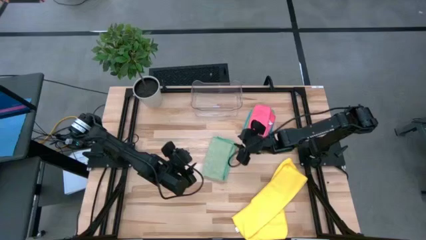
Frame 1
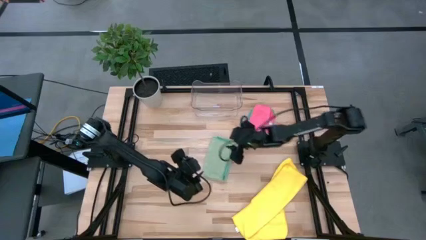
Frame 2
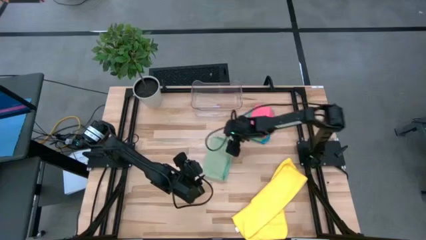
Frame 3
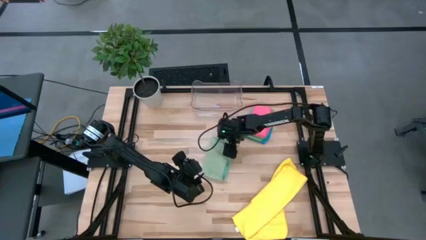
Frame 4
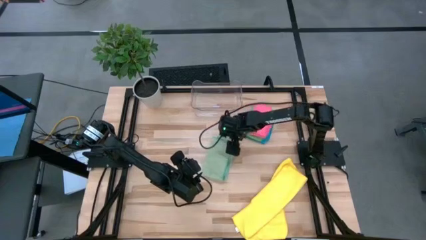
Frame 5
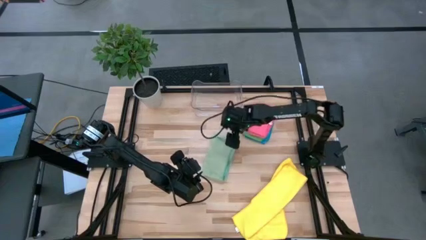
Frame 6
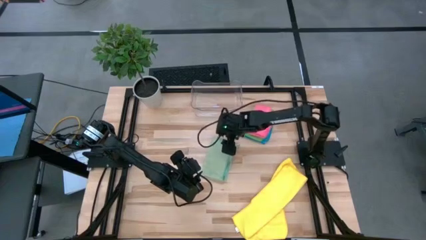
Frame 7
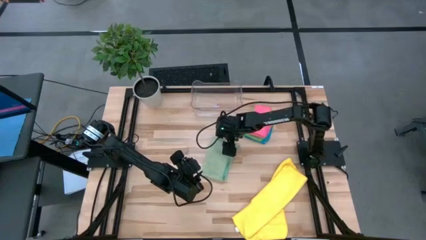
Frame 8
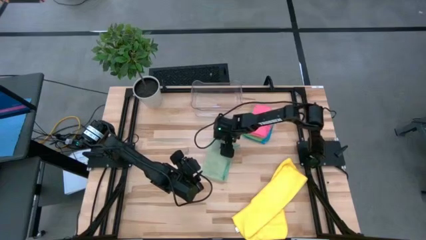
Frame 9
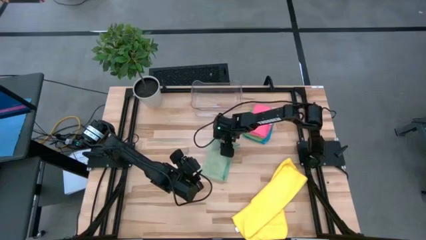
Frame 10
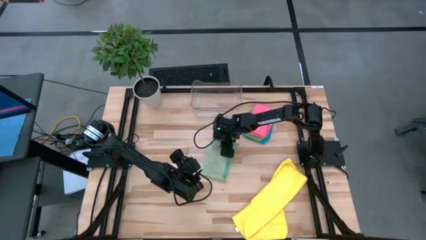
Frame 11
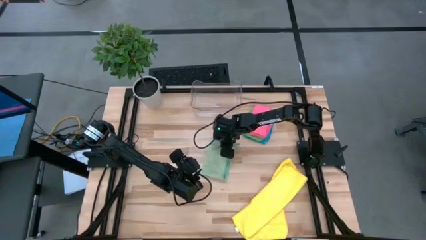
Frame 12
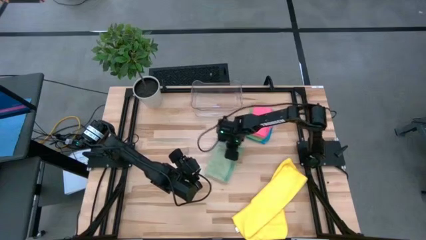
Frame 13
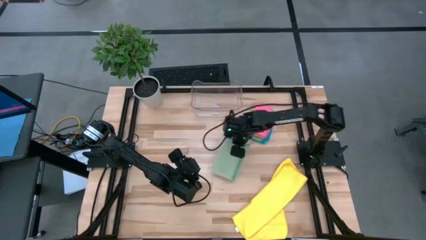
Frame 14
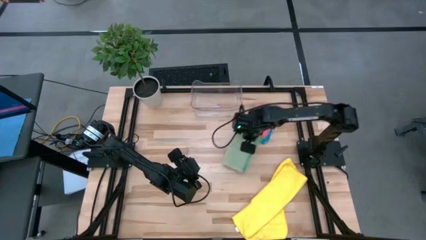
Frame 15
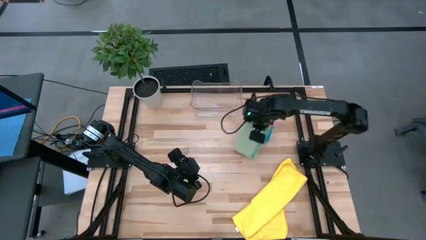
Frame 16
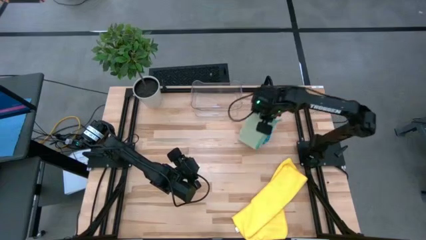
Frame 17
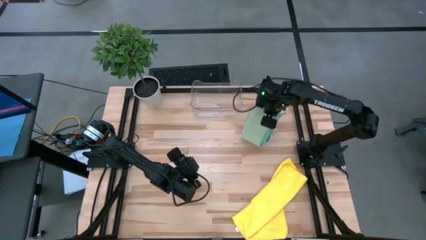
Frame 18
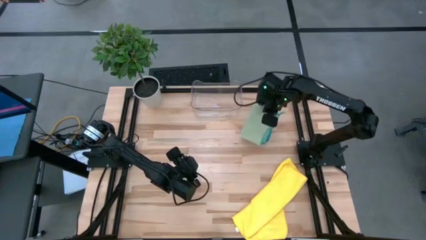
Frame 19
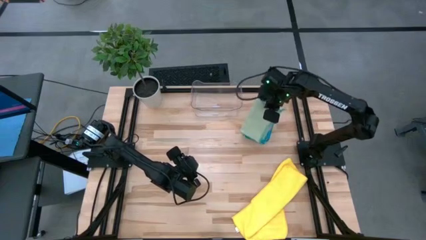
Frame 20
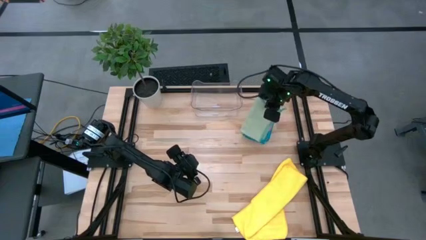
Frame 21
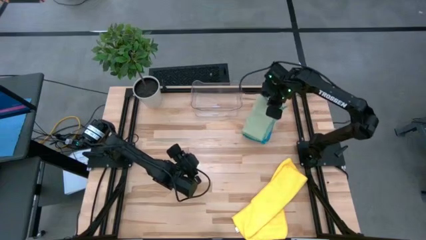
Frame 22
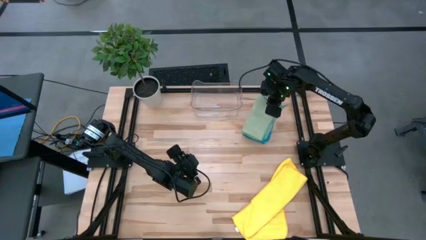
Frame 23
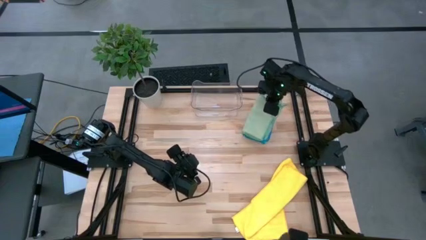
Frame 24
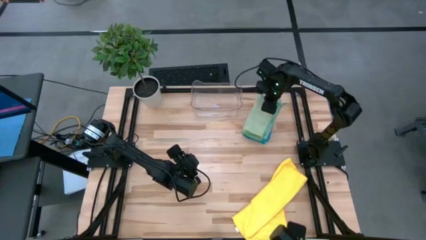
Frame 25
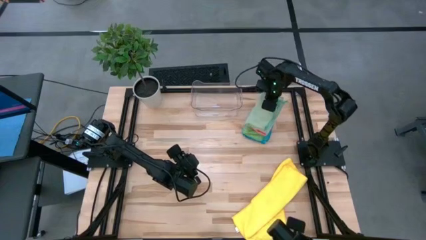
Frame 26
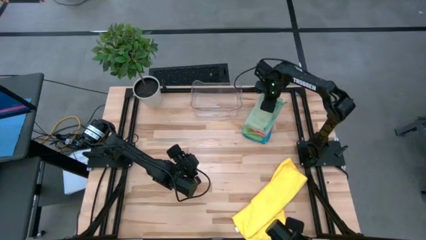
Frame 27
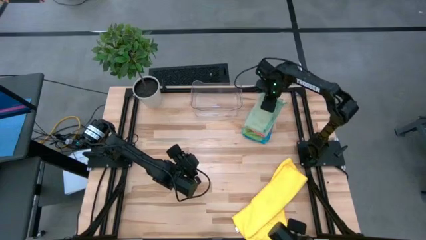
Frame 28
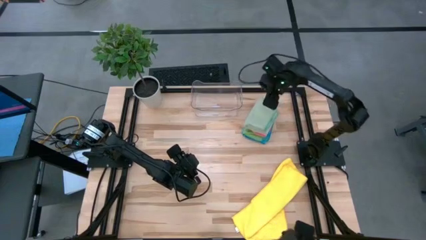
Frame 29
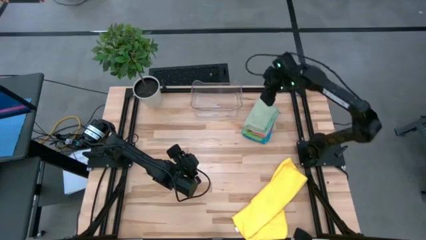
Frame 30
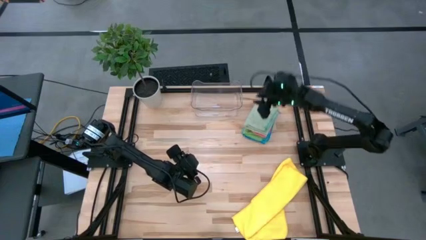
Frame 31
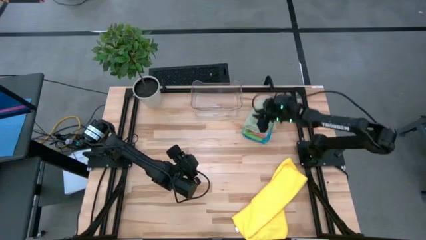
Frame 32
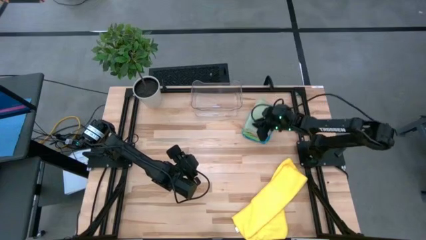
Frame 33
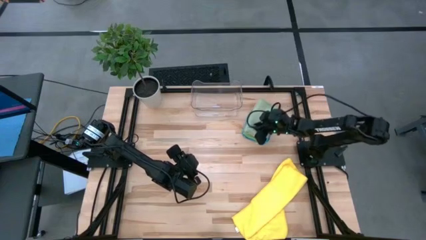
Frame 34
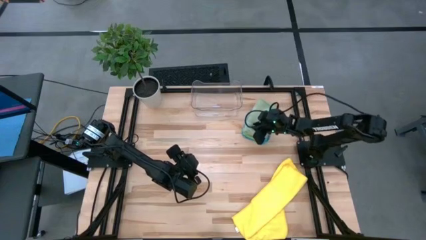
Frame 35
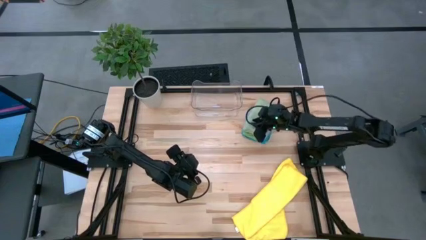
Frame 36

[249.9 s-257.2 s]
Task: Fold microfiber towels
Stack the light green microfiber towel on top of the pink microfiber towel

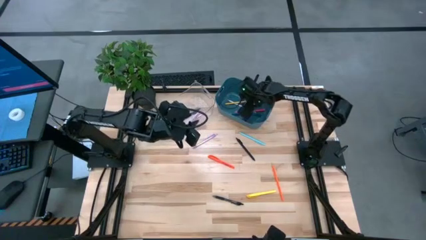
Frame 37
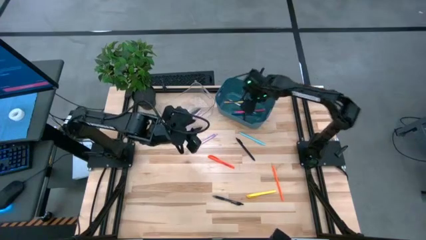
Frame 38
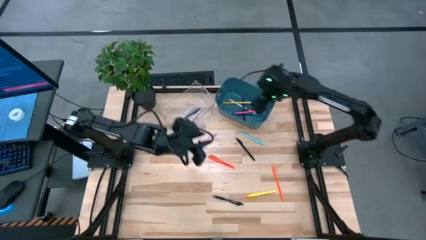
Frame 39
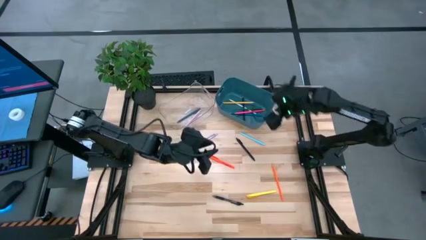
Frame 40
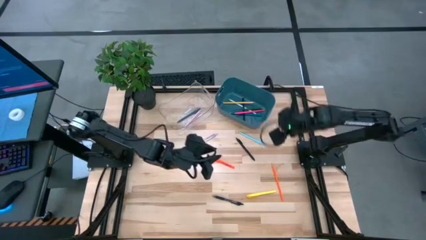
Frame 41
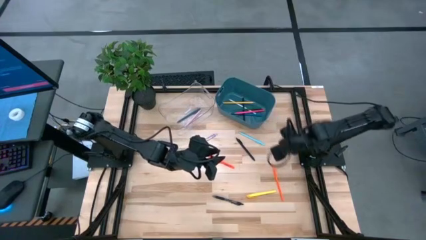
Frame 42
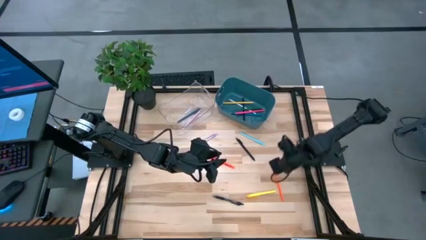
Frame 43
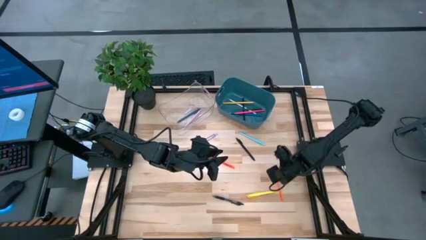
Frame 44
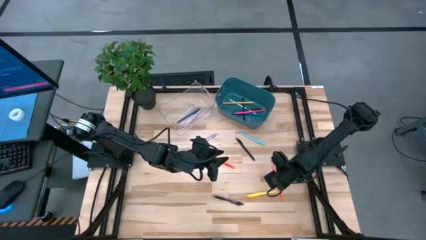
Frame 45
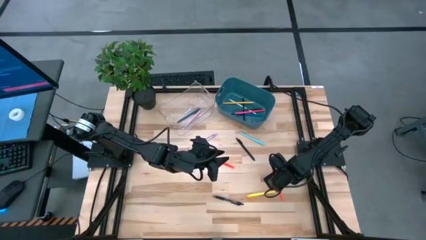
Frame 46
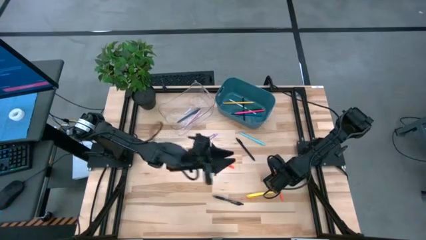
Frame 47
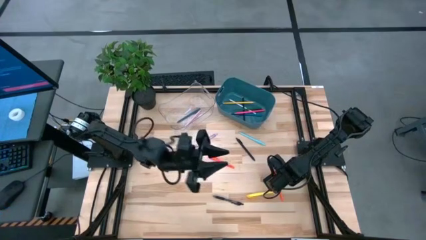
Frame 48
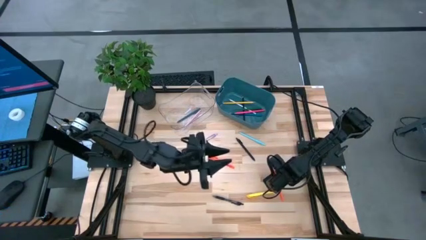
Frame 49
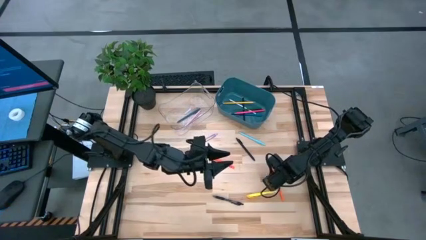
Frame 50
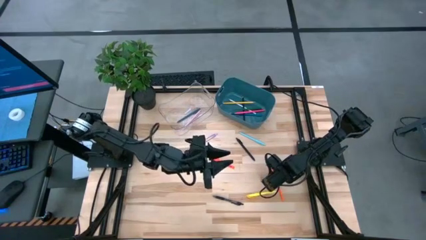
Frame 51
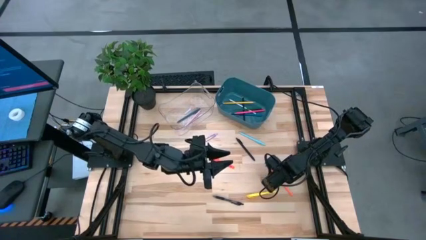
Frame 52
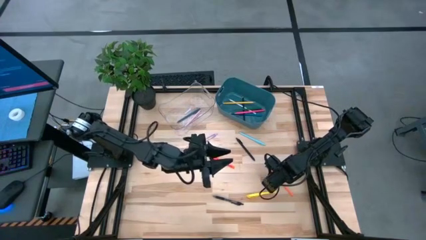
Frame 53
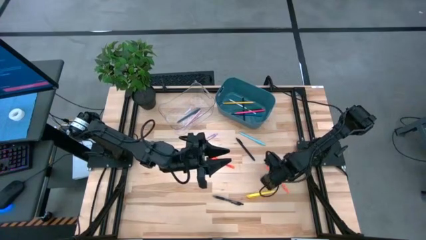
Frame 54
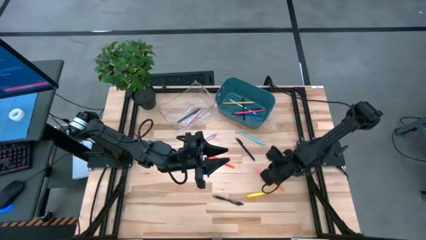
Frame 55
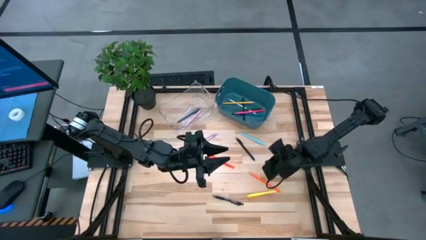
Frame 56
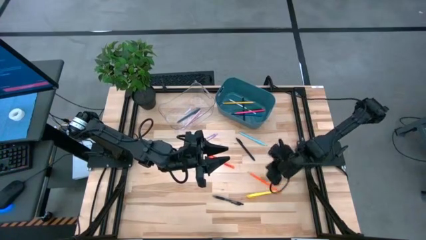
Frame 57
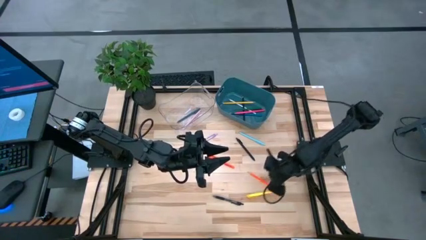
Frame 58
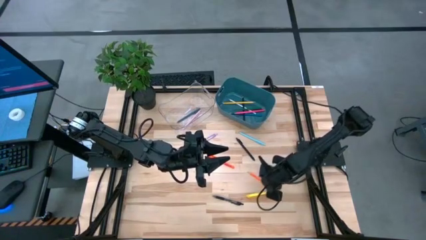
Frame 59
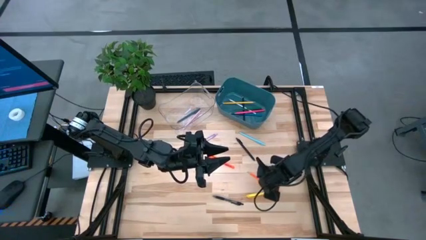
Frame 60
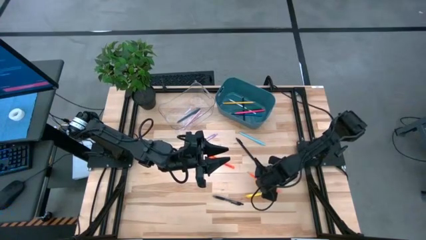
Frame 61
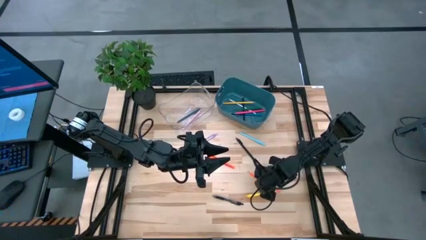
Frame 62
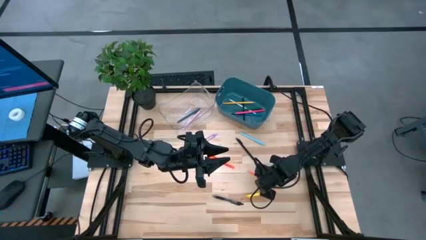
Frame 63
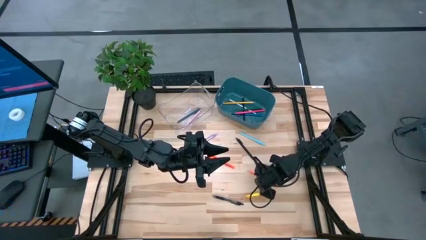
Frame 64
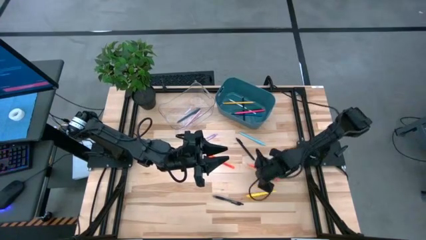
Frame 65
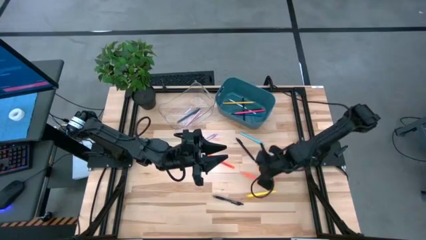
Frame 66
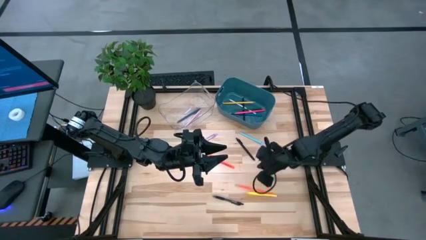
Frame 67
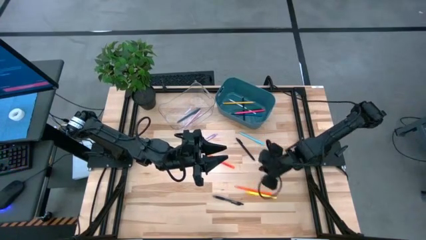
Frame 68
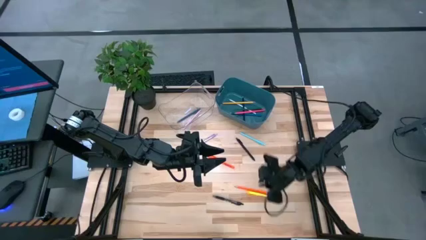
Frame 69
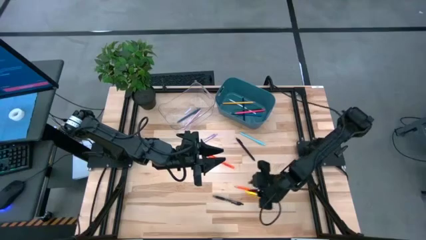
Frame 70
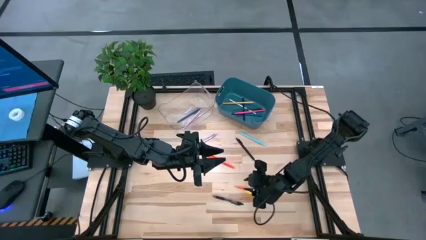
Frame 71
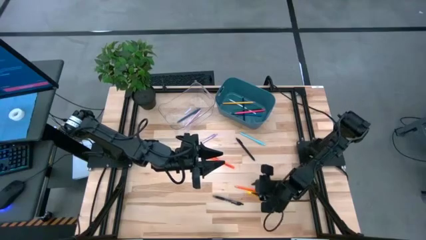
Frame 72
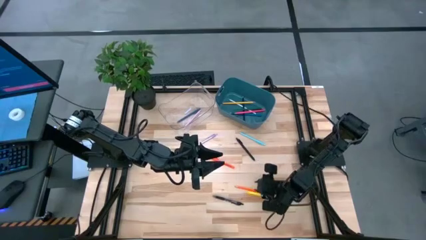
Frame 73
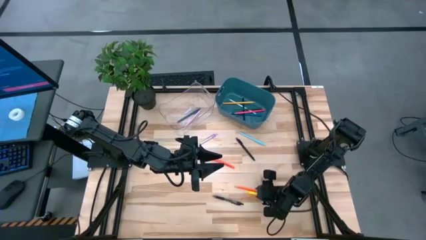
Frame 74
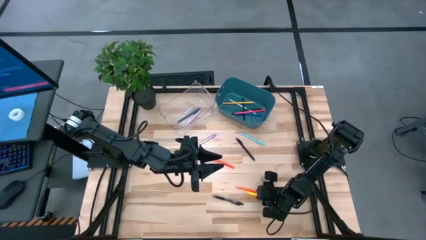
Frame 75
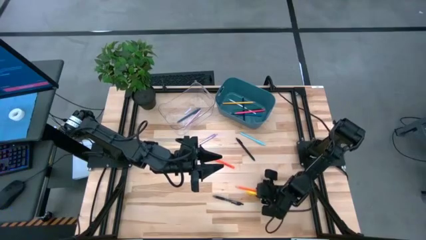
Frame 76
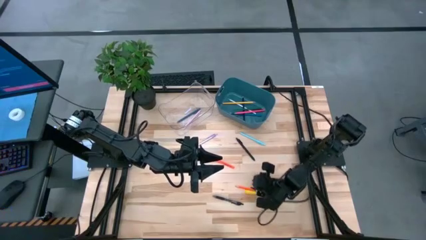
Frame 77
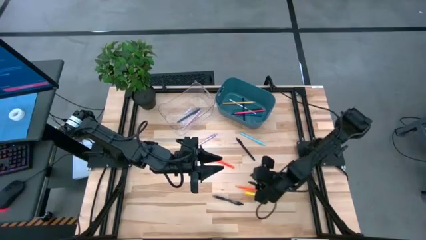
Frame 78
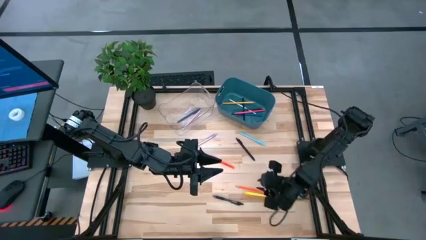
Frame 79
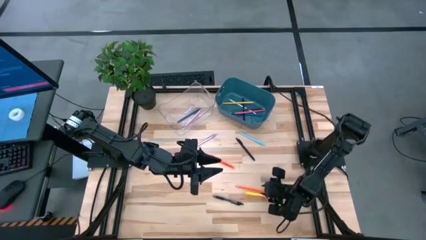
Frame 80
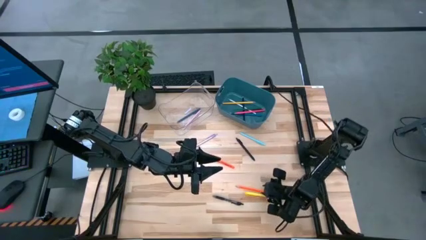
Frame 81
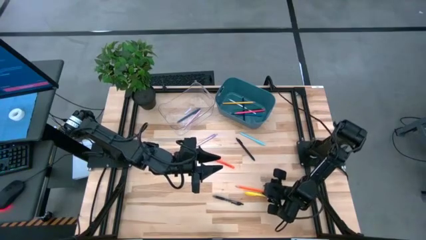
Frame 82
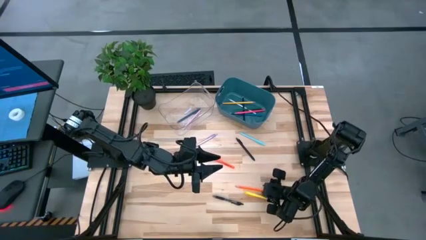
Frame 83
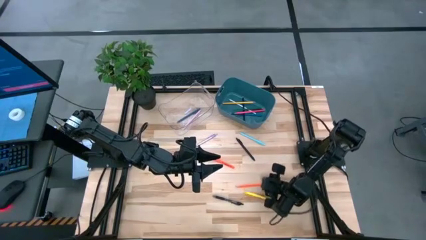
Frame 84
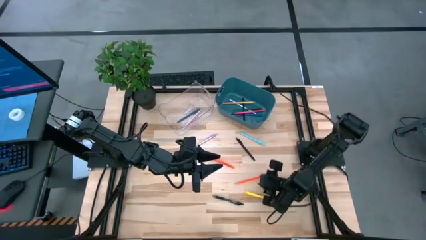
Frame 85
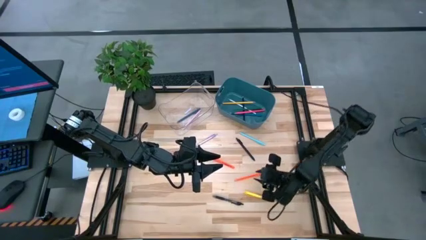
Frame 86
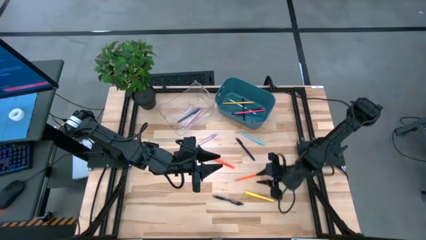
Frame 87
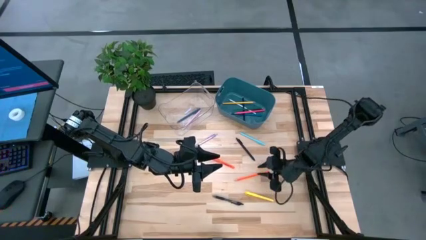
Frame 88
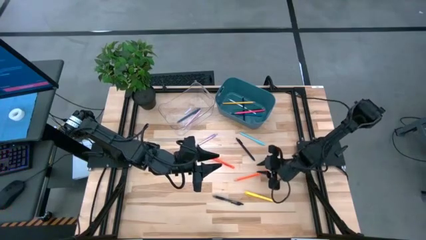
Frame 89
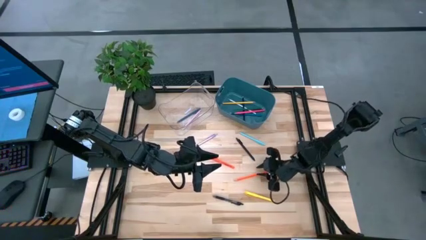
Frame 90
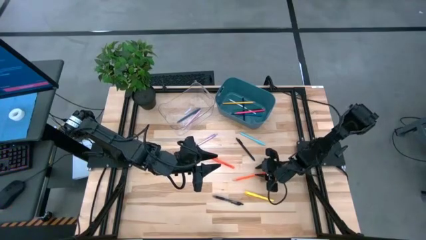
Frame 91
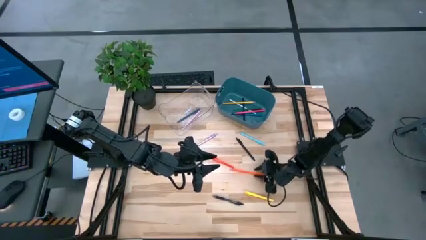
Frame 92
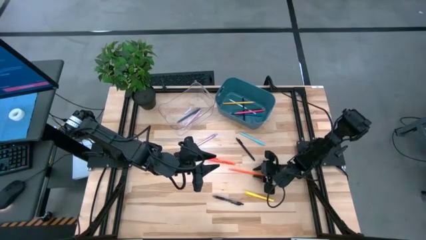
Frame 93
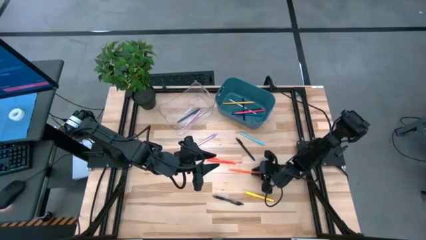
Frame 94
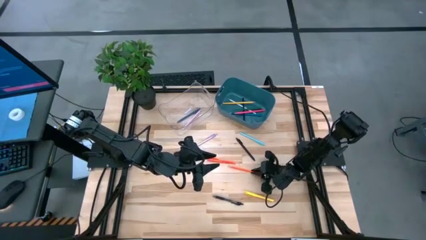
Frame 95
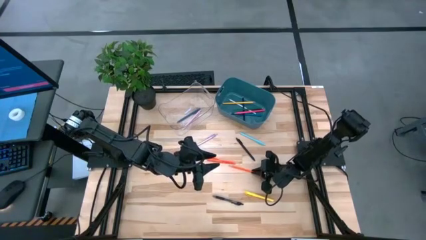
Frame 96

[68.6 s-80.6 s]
Task: Sort pens & pencils
Put the orange colored pencil into the blue bin
